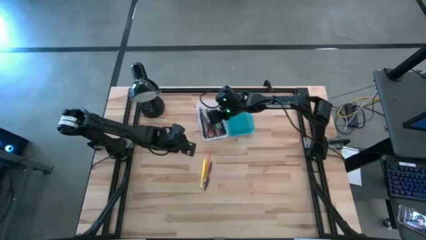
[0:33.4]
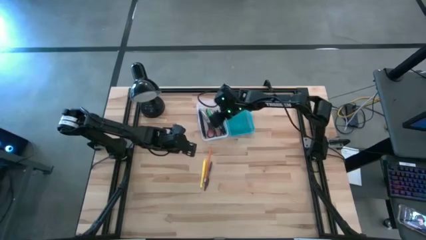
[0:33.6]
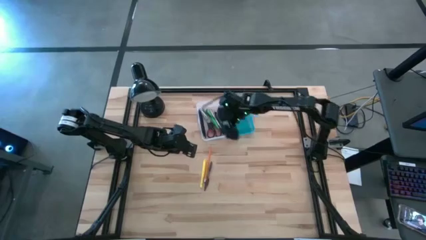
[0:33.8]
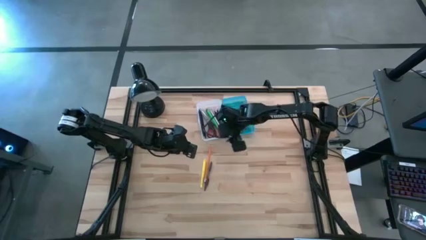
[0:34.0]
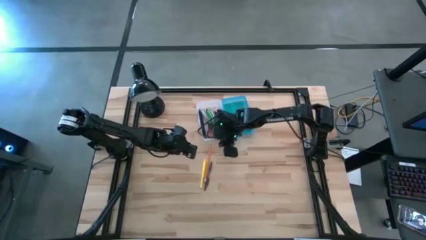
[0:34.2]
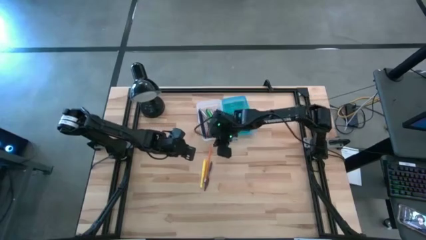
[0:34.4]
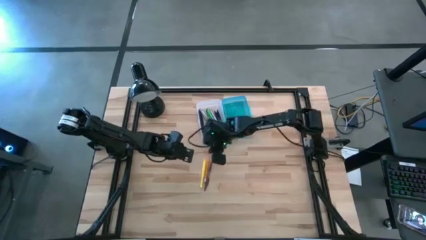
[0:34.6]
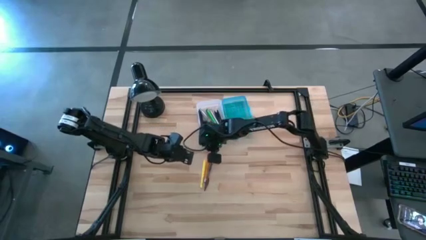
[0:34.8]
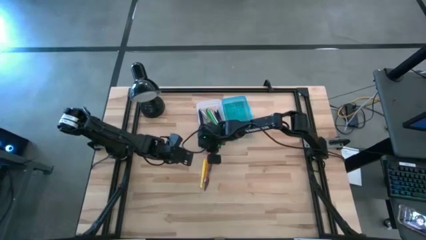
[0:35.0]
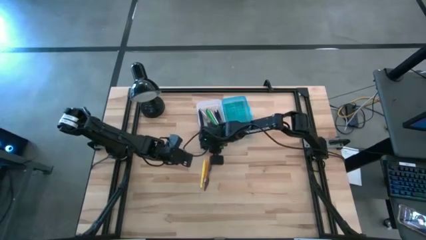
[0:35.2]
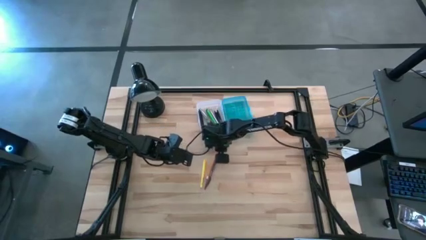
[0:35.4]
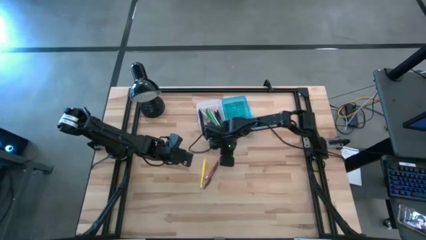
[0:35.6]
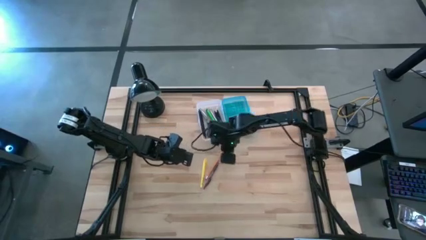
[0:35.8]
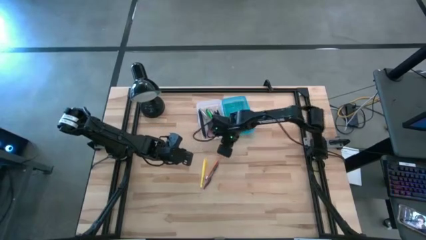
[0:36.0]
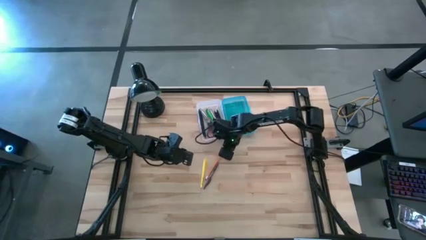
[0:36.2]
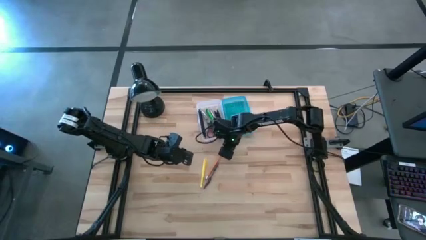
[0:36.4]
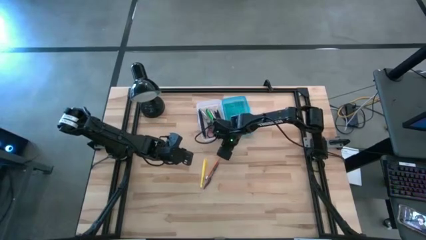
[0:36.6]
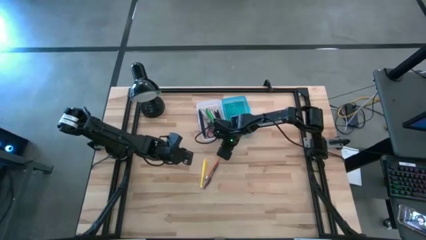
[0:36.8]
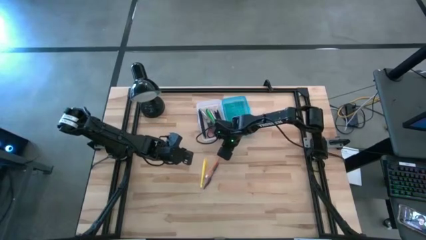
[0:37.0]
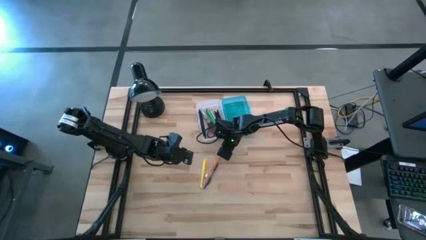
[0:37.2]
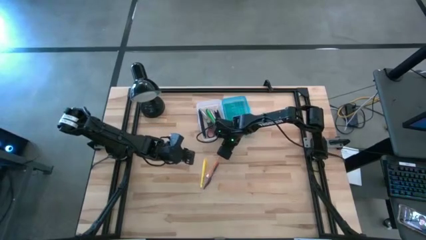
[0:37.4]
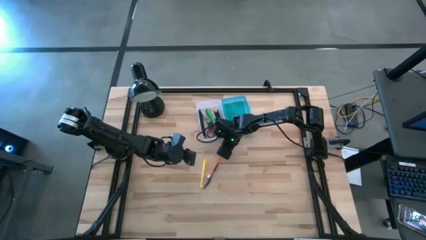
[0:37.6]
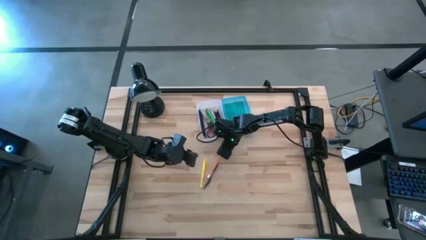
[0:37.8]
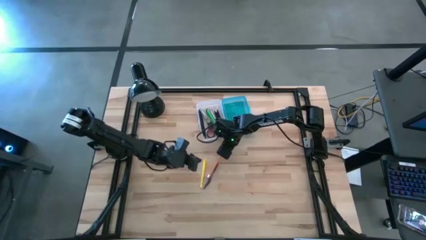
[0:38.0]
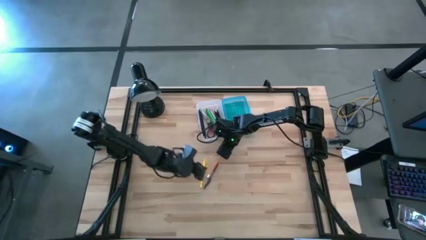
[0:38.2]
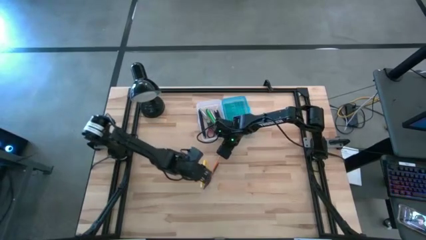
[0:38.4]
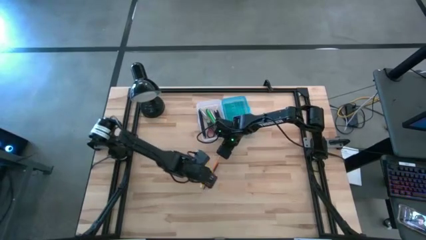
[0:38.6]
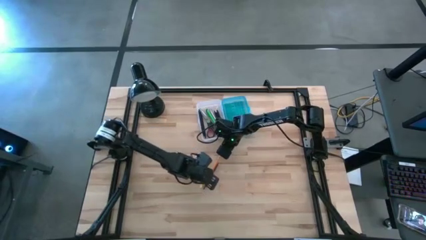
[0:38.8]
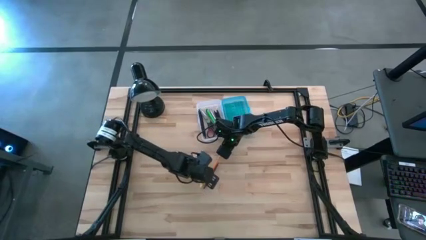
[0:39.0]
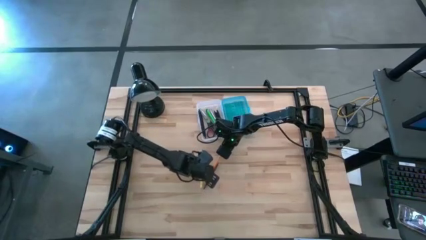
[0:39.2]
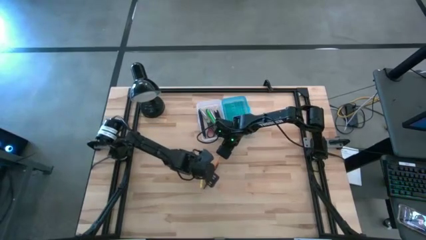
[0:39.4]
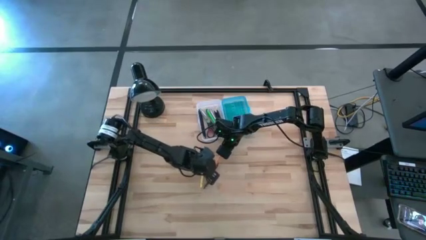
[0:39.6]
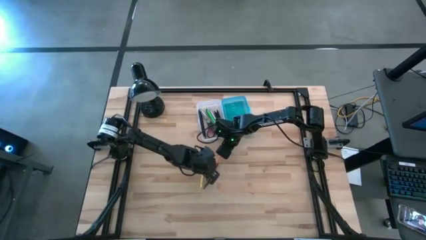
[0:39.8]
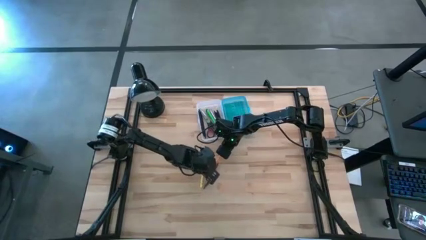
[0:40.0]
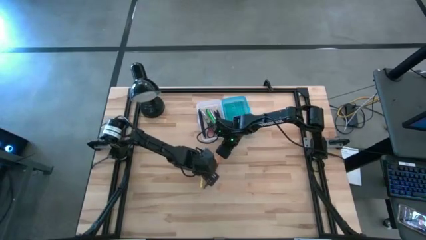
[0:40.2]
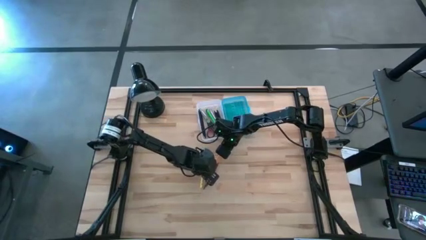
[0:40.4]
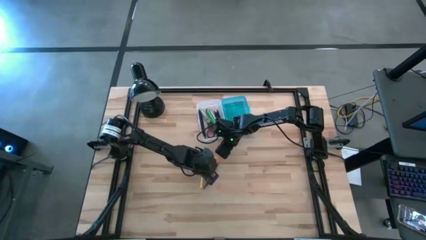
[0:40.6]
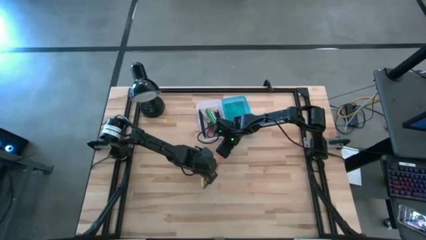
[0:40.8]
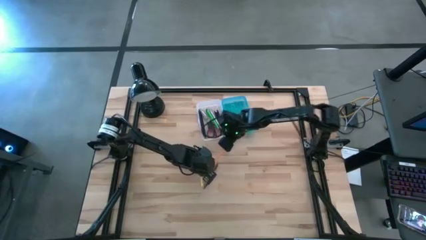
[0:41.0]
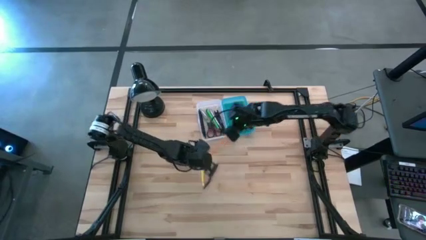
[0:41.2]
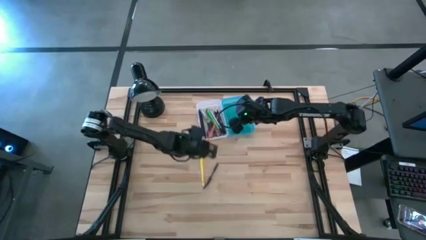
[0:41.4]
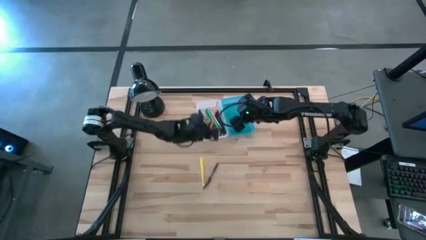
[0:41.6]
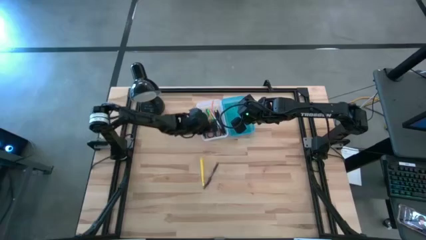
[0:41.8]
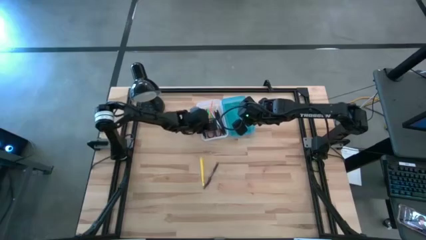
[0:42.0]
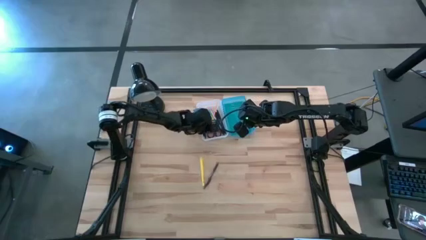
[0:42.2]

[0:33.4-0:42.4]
Task: Pick & place school supplies into a supply box
Put the orange pencil into the blue supply box

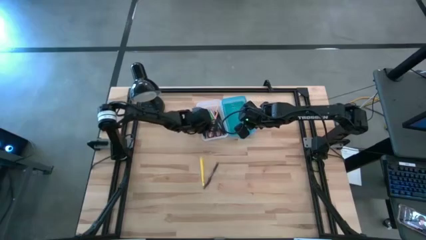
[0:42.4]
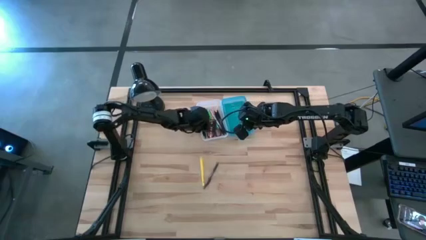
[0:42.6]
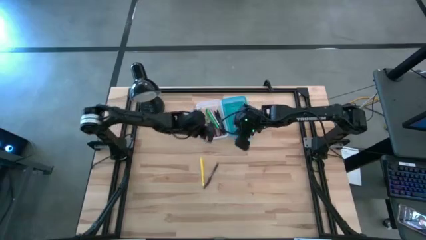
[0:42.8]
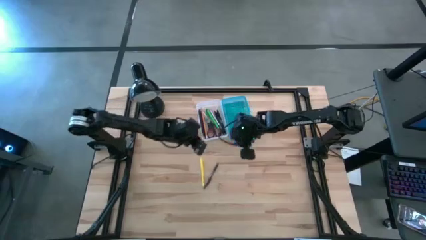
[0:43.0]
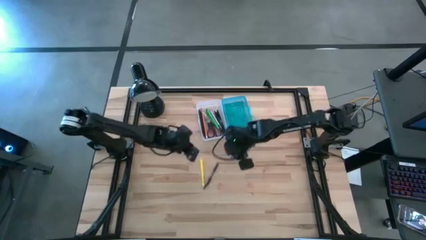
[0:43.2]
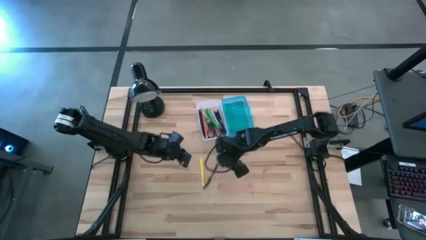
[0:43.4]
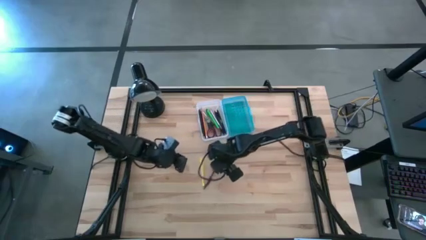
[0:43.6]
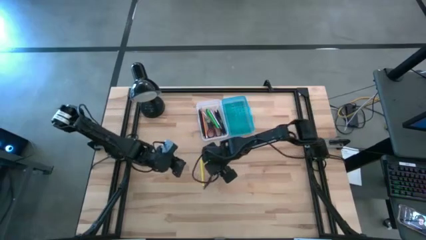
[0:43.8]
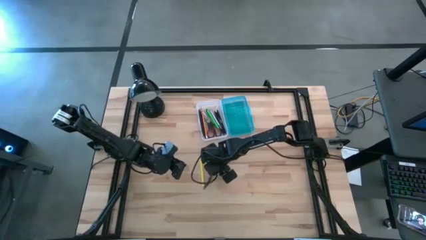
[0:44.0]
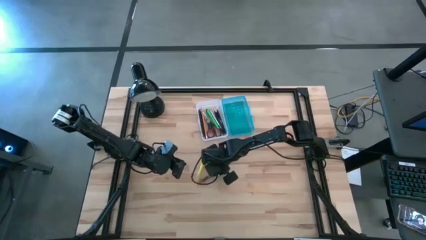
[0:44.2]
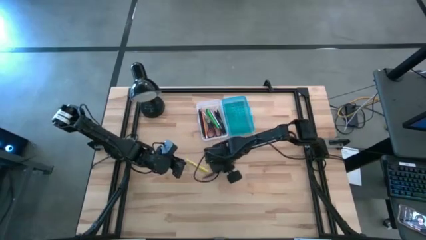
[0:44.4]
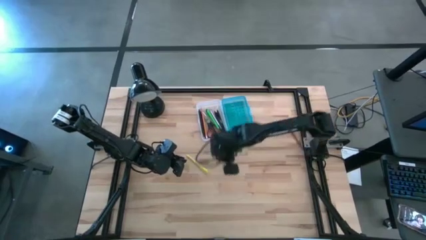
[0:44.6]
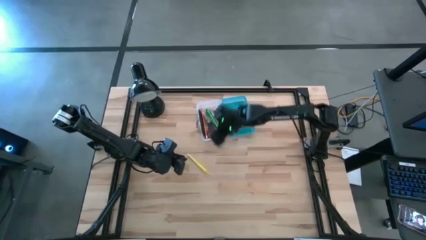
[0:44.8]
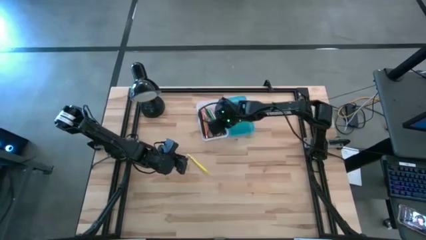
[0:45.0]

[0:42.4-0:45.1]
Put the brown pen into the blue supply box

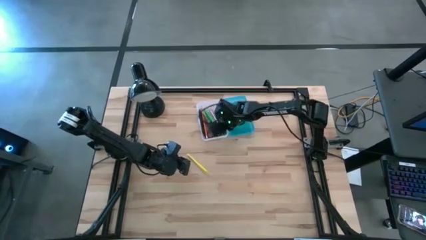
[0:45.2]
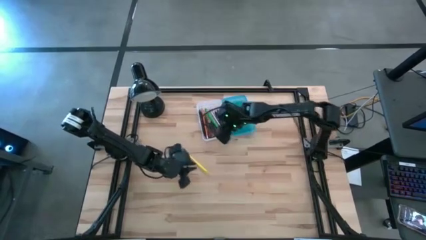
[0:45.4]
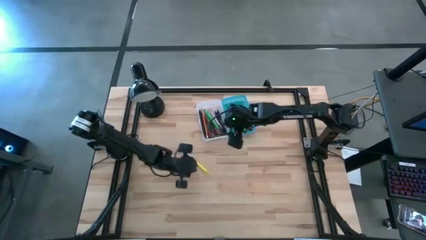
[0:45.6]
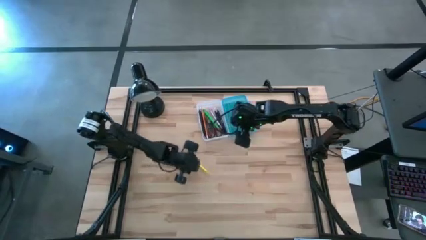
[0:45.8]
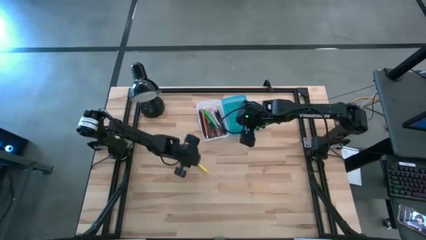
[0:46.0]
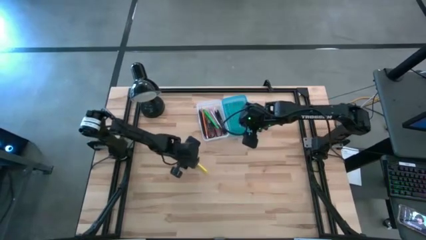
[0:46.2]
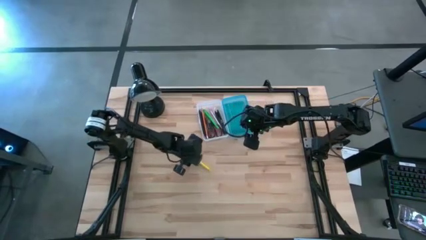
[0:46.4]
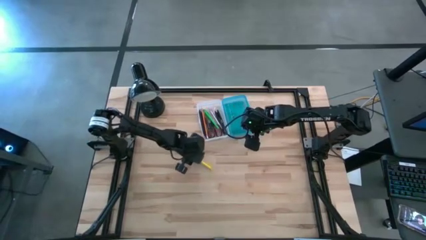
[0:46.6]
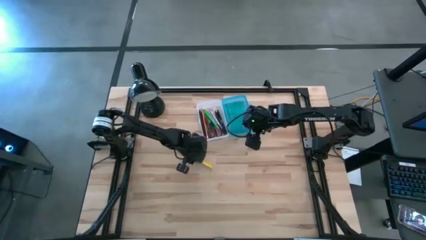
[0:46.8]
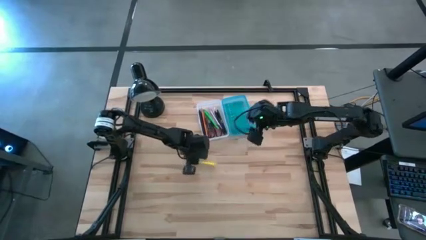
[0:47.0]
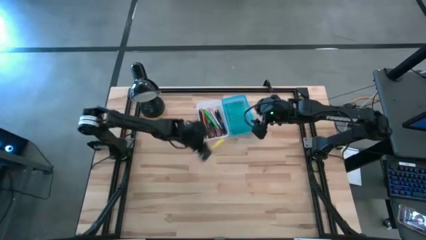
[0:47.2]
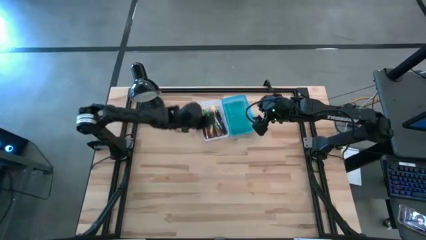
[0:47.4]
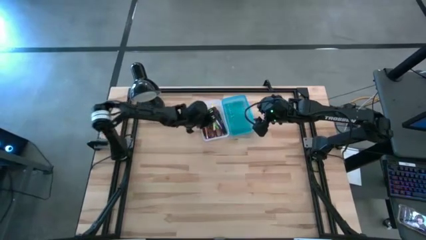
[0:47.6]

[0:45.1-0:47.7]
Put the yellow pen into the blue supply box

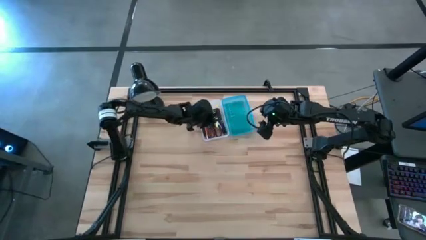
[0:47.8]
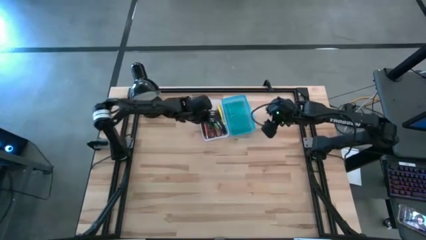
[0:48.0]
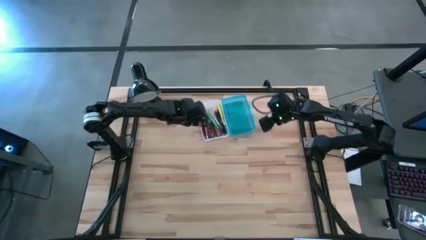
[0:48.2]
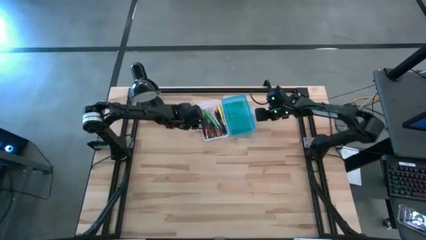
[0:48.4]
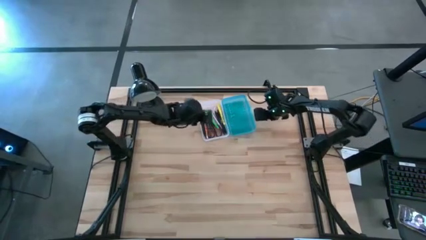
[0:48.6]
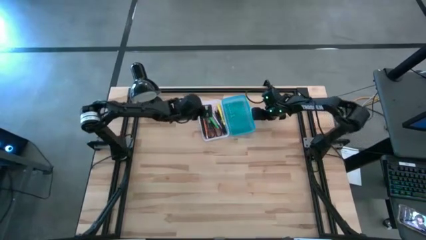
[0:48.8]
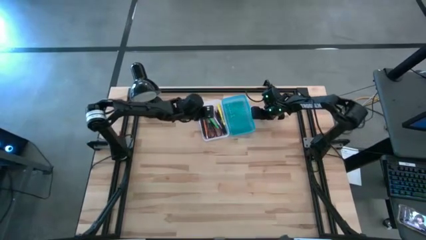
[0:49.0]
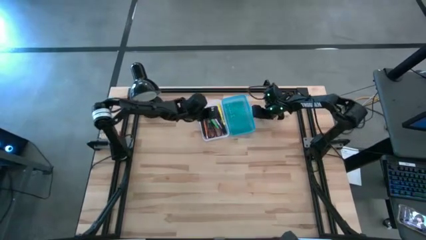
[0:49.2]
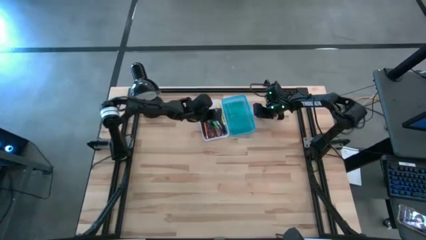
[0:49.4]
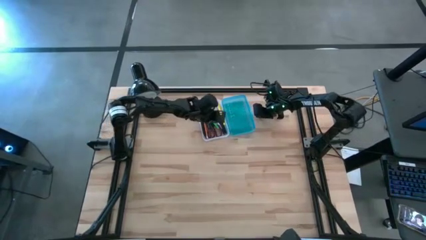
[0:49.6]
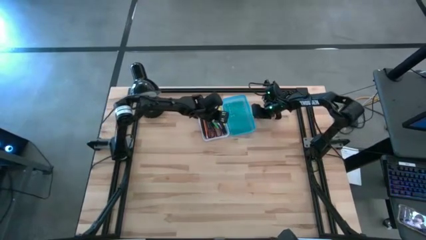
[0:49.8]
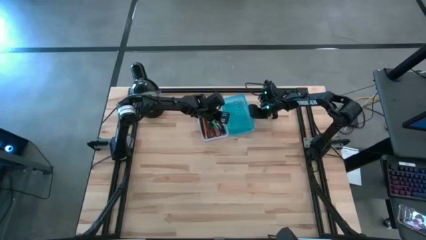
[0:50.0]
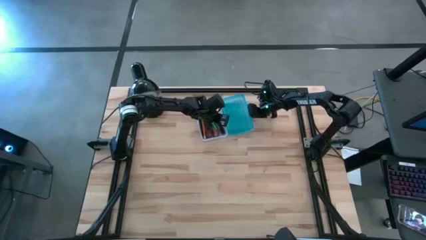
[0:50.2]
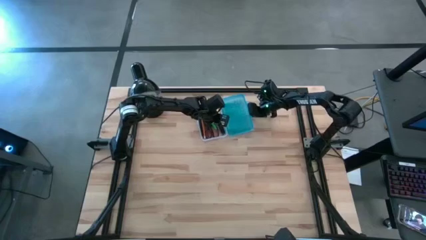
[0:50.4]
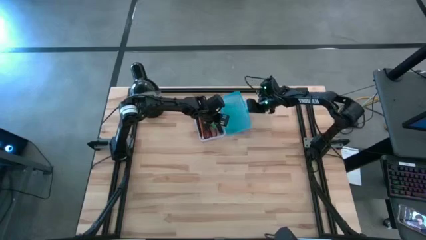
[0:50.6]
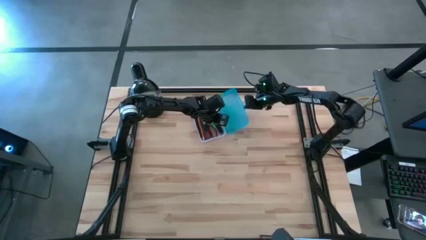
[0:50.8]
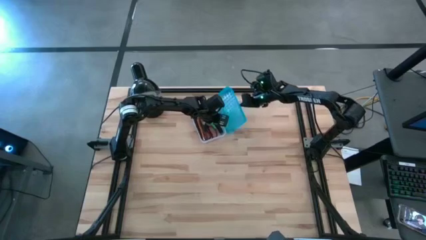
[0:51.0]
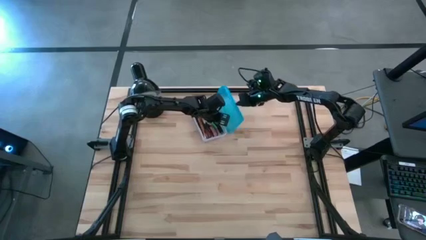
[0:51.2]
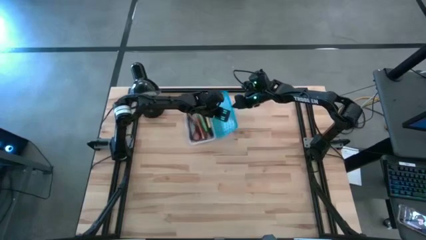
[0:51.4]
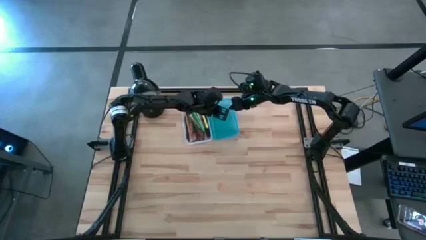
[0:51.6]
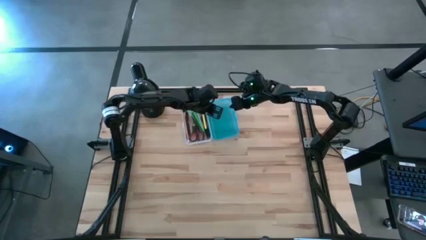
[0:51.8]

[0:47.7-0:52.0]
Close the blue supply box
